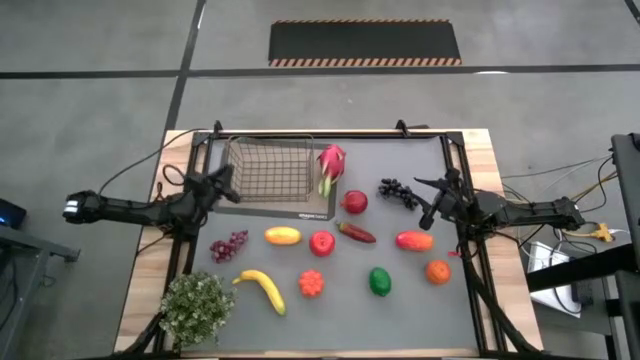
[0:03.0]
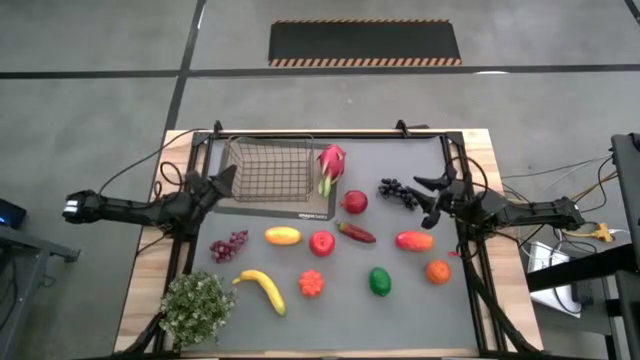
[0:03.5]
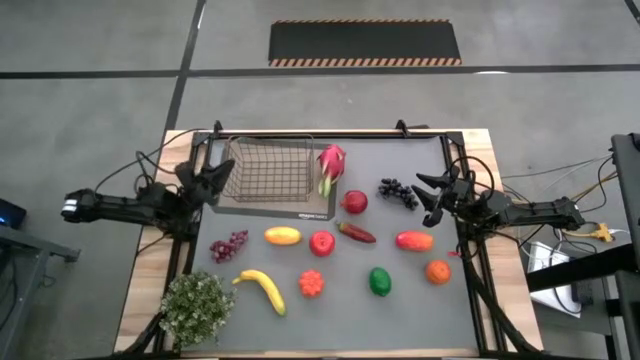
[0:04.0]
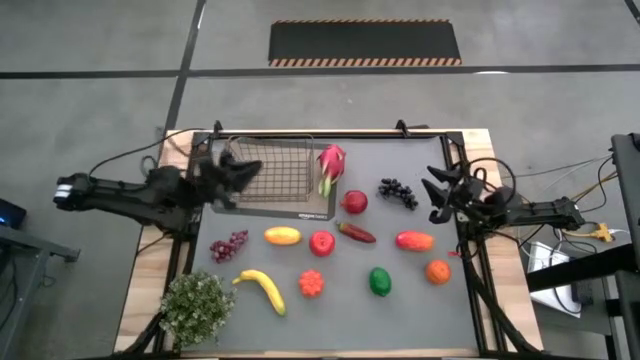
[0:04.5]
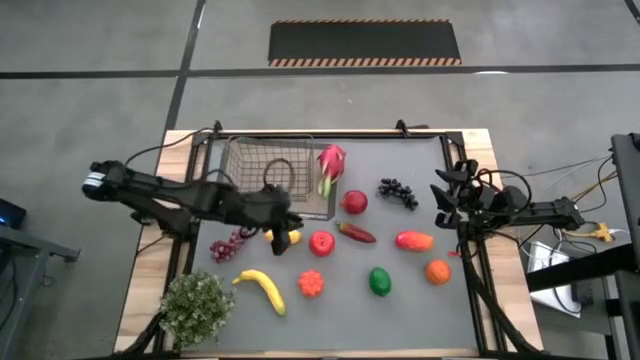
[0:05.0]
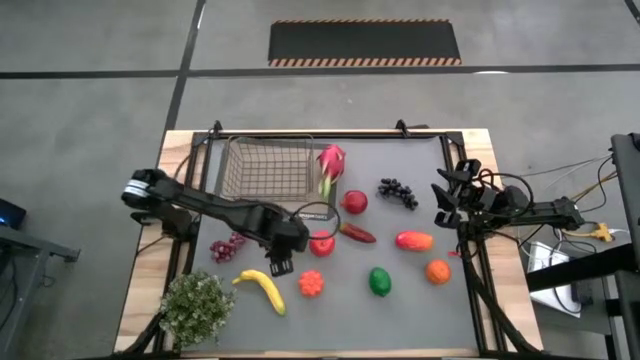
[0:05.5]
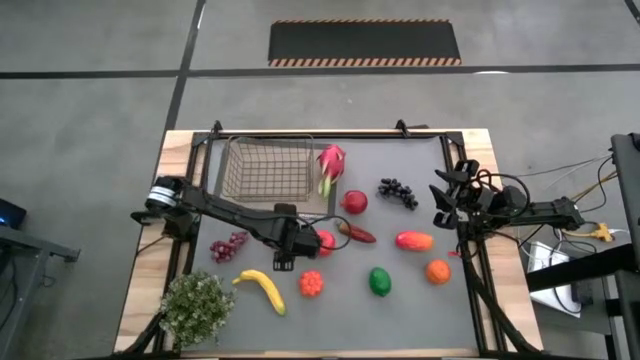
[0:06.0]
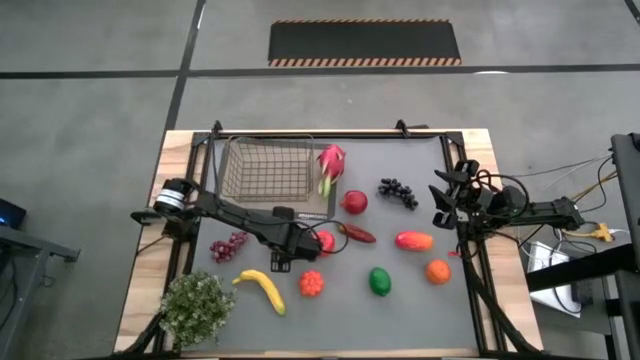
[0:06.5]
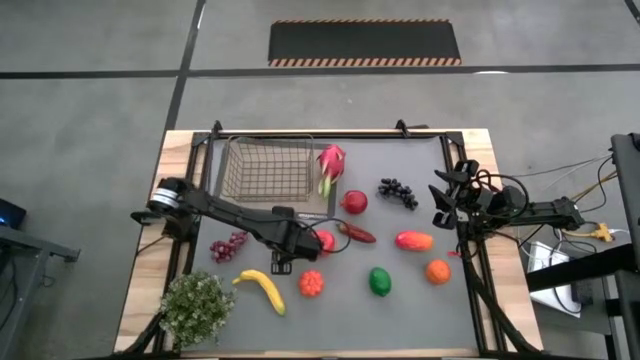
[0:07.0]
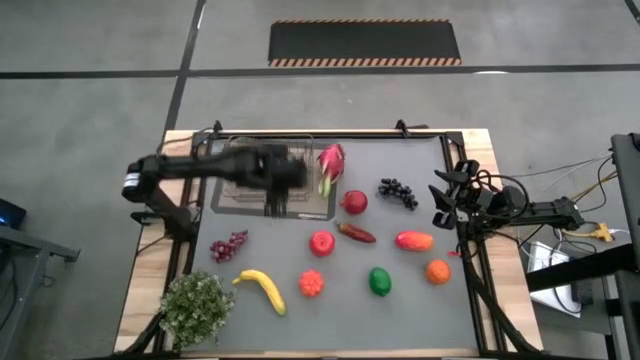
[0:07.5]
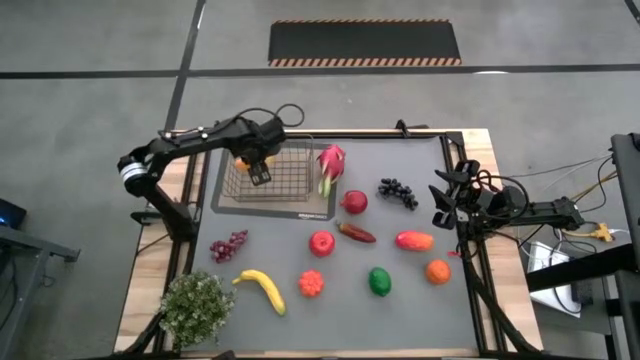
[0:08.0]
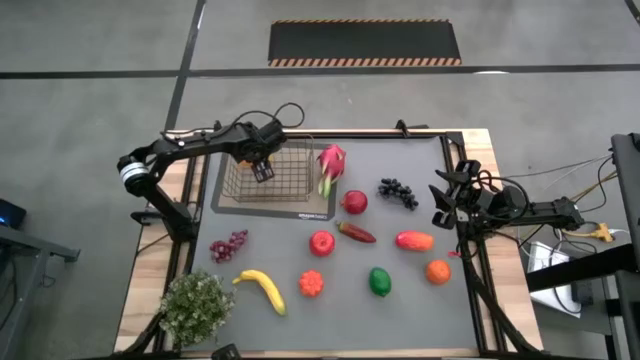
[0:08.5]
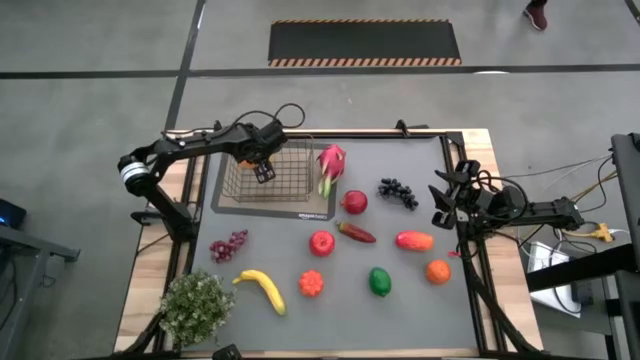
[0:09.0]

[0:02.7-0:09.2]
Task: Build produce basket
Put the yellow mango into the wire basket

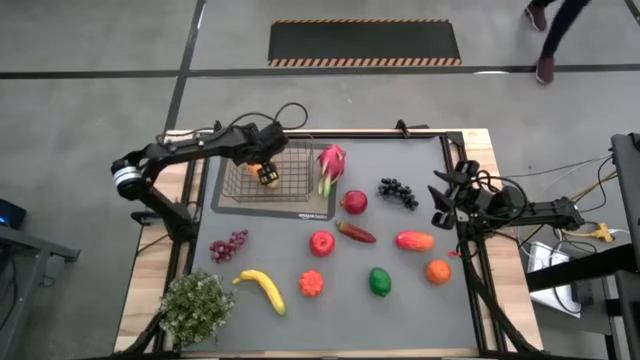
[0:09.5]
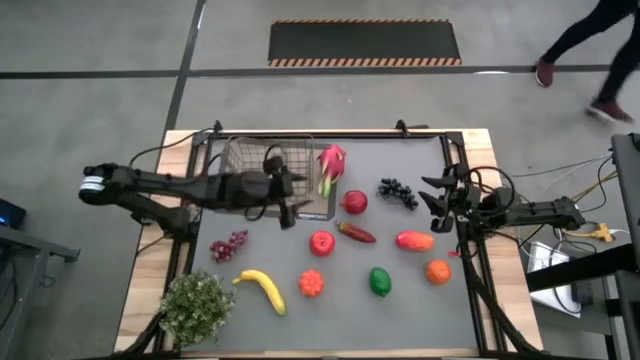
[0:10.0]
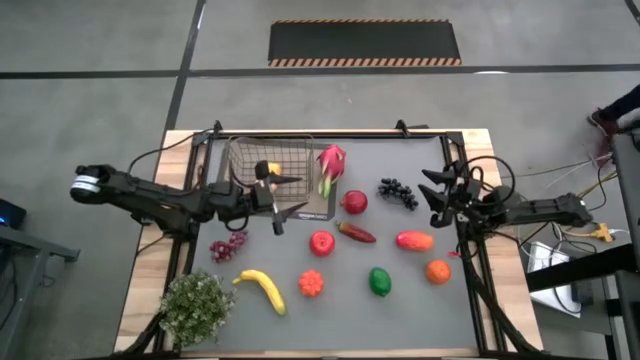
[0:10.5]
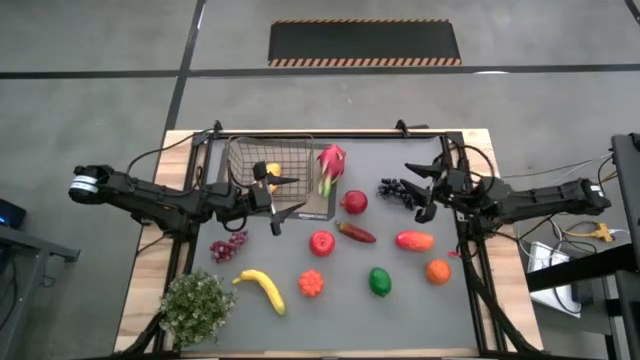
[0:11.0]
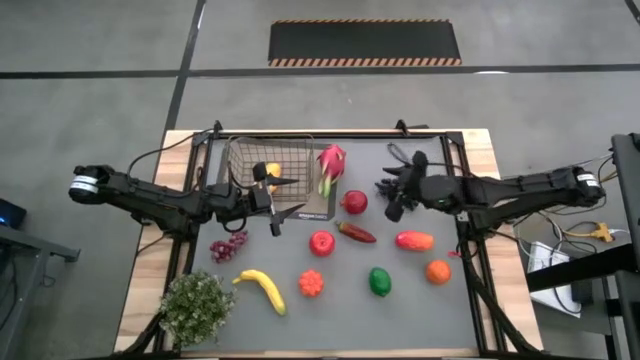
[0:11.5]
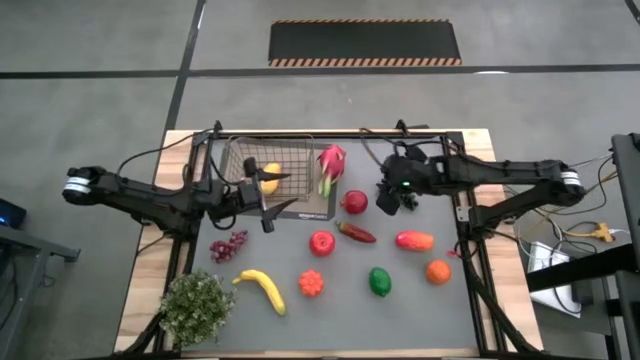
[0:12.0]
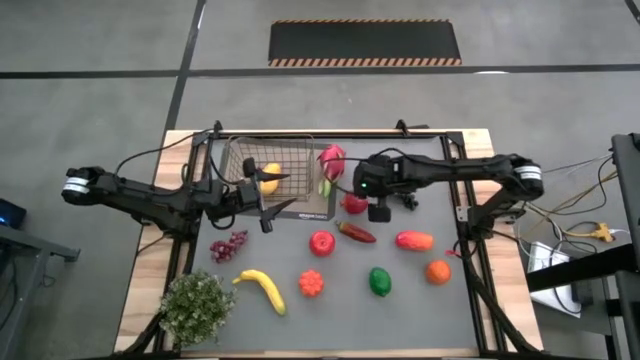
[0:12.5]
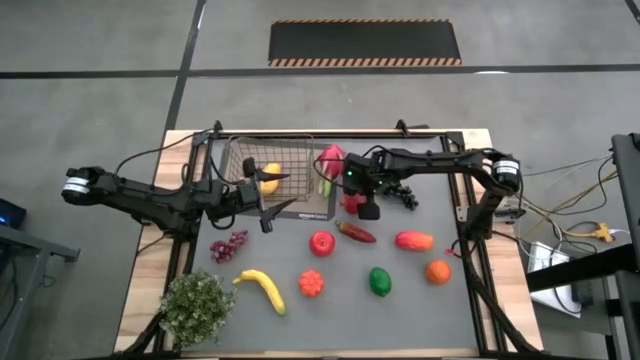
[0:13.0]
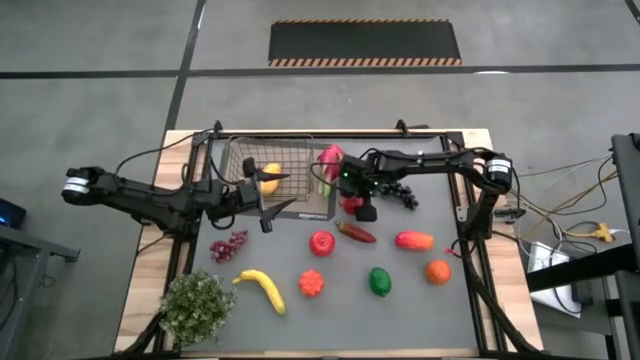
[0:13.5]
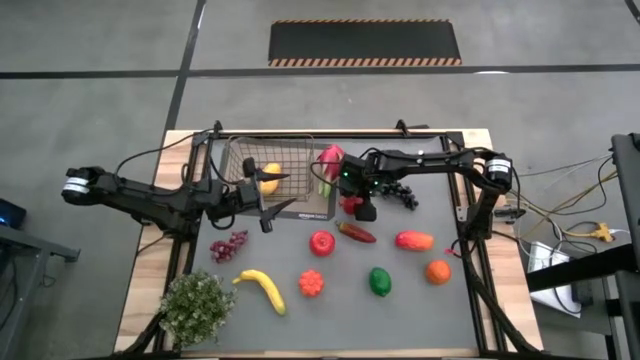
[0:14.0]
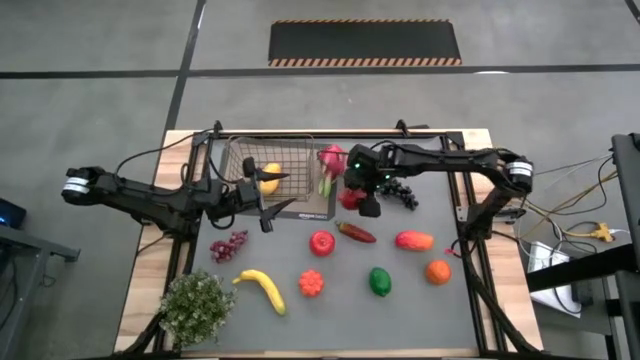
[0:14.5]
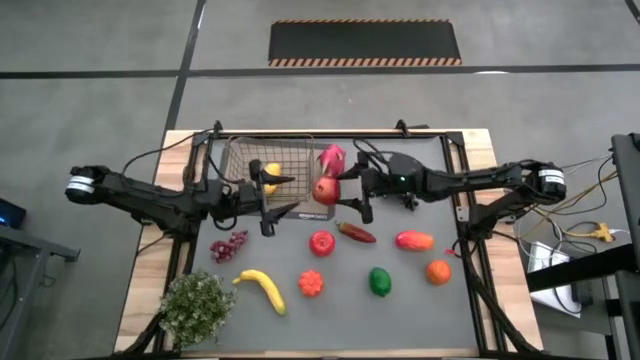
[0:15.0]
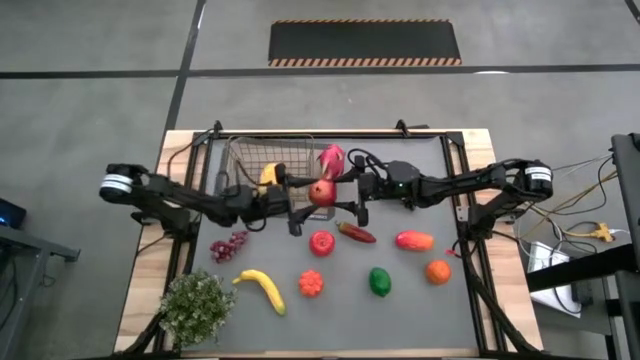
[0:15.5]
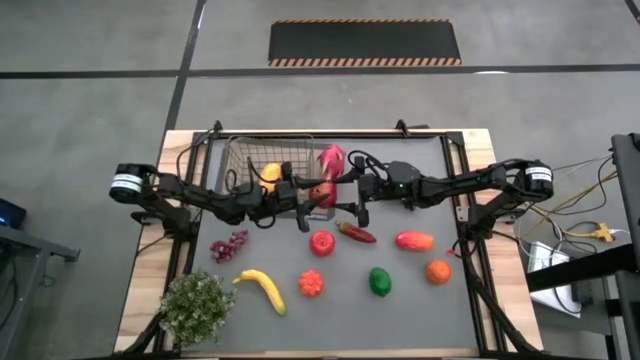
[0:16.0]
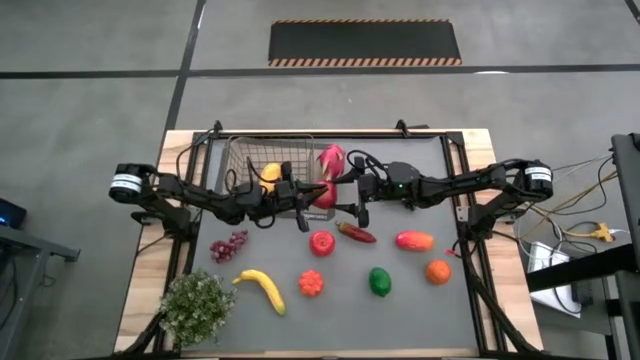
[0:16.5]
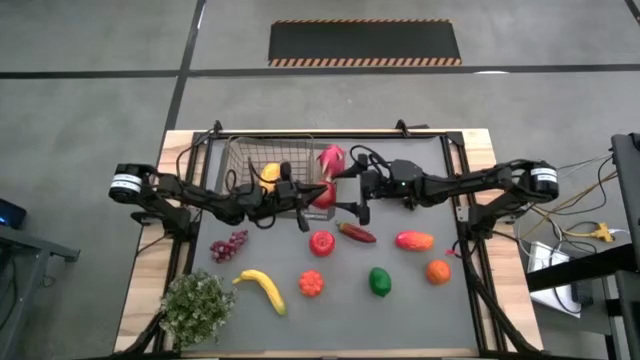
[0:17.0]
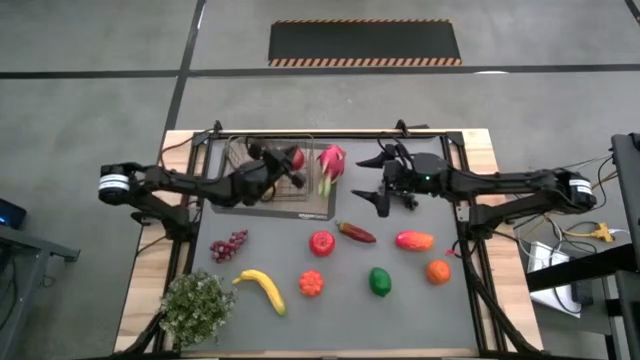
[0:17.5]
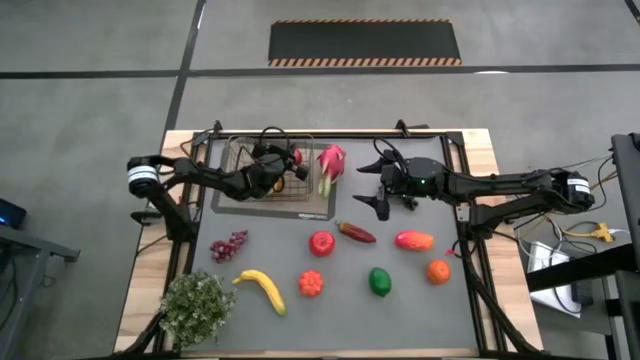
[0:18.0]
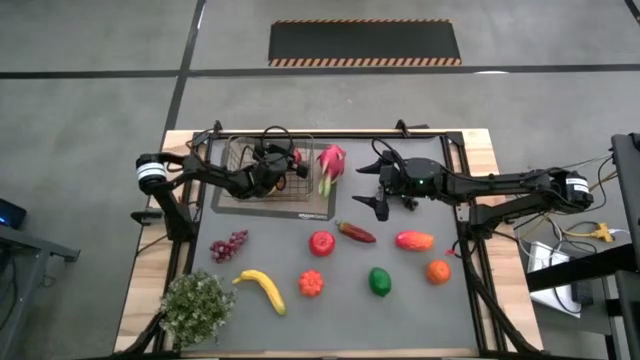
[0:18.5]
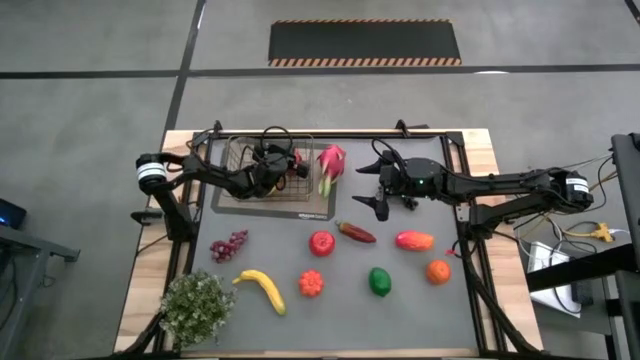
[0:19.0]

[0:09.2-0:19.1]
Put the red pomegranate into the wire basket

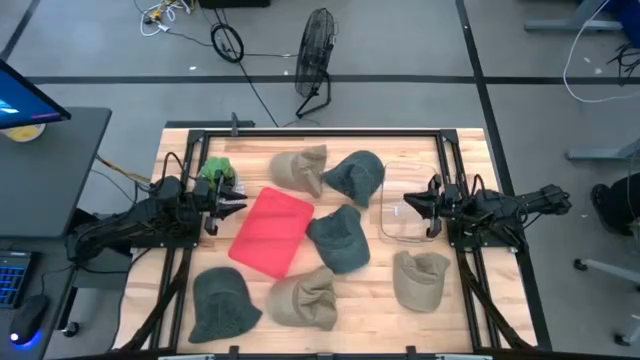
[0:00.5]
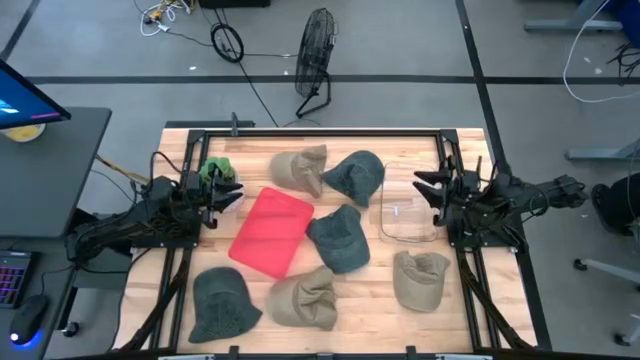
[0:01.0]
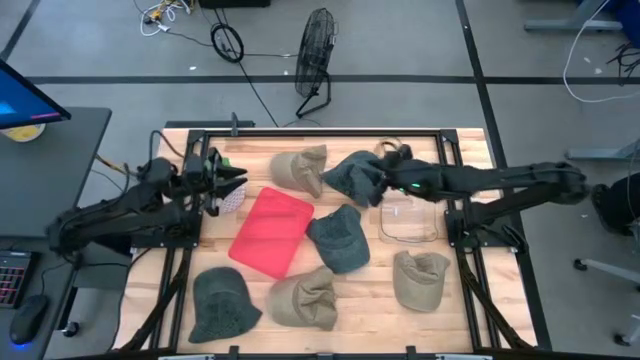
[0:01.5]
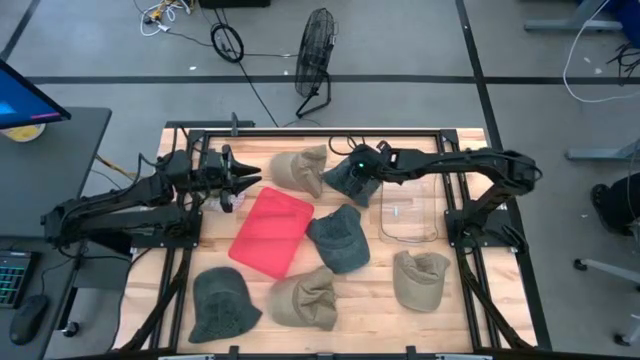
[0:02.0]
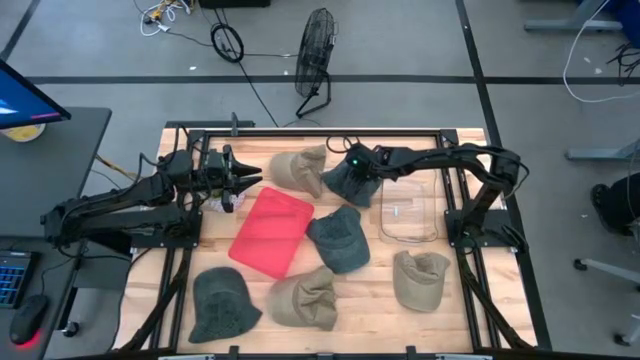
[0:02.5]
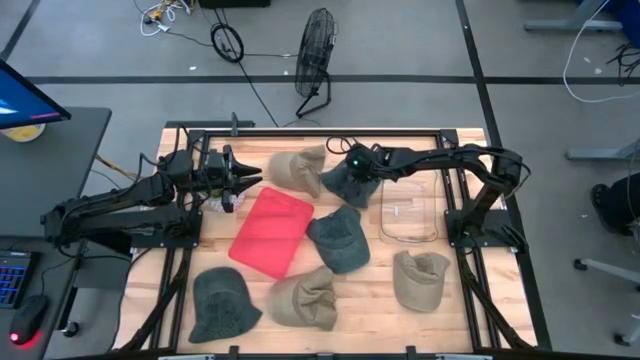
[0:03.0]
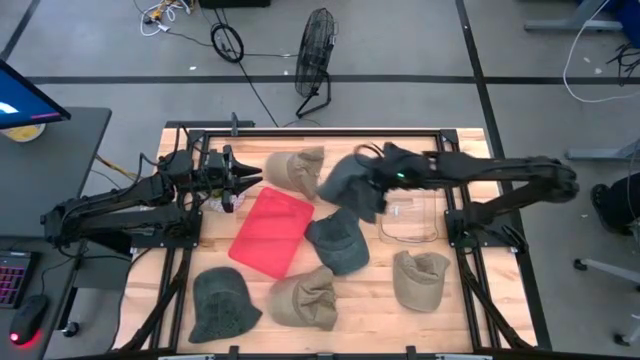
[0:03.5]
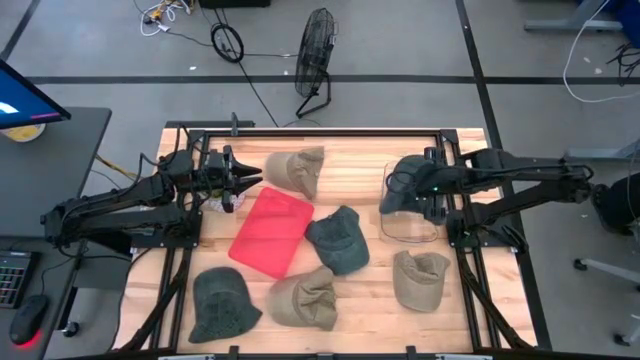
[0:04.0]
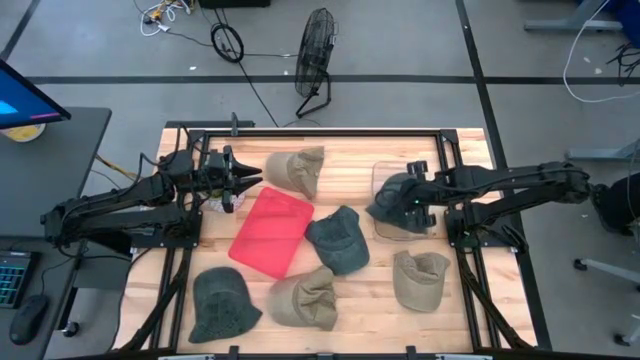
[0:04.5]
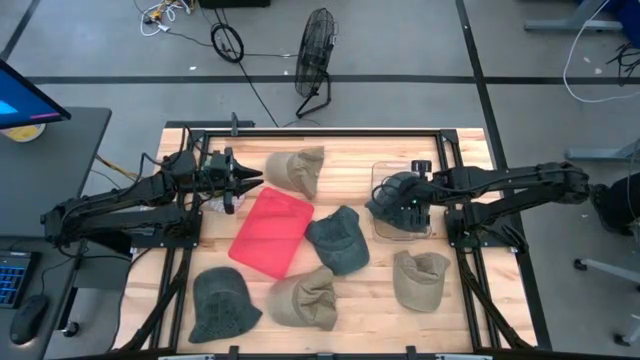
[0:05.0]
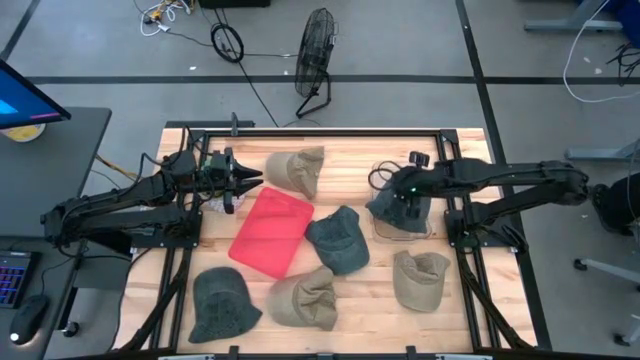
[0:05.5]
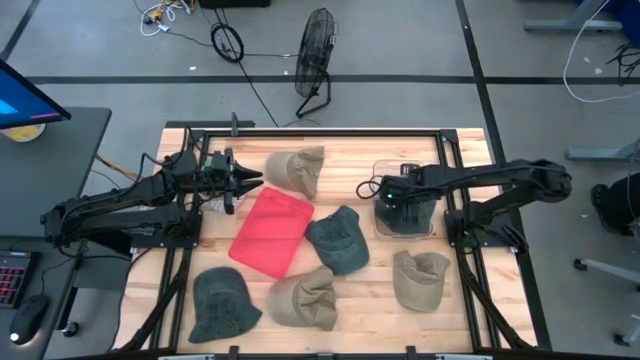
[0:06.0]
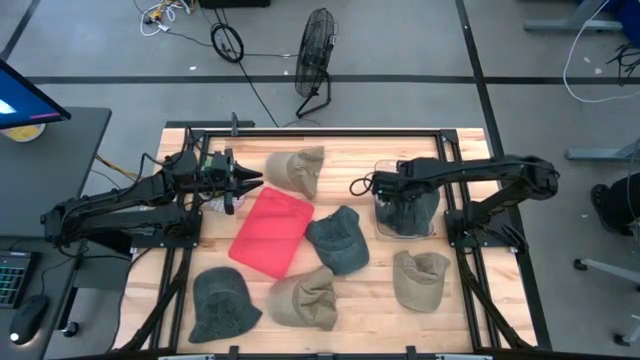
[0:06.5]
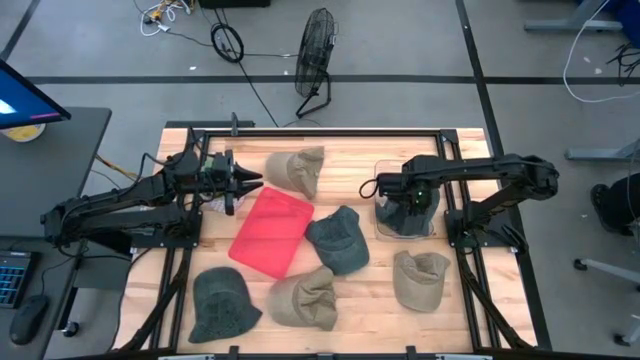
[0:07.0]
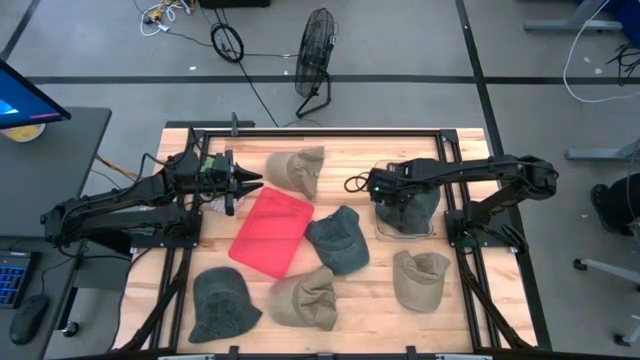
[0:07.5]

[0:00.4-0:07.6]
Task: Pick & Place hat
Put the top black cap into the transparent bin
